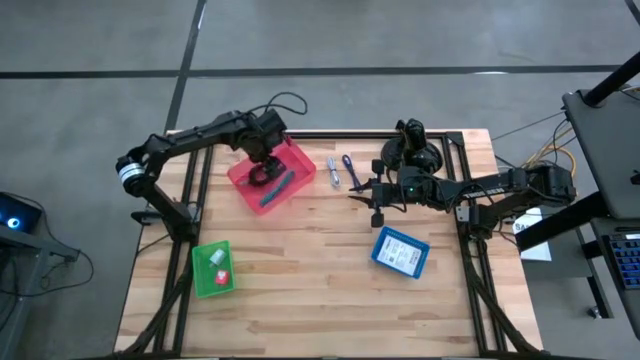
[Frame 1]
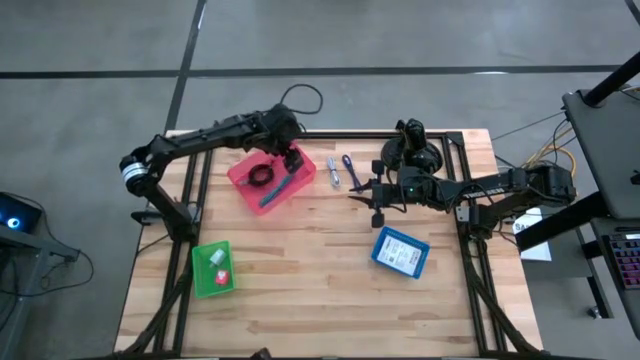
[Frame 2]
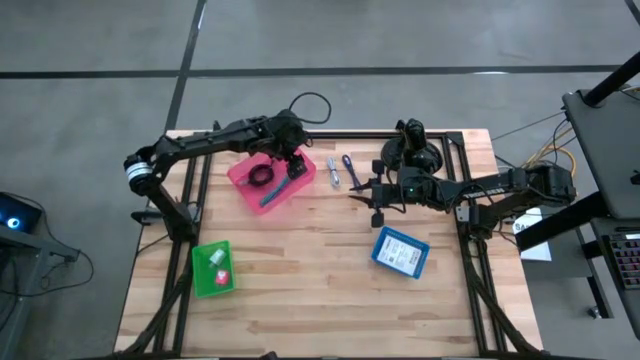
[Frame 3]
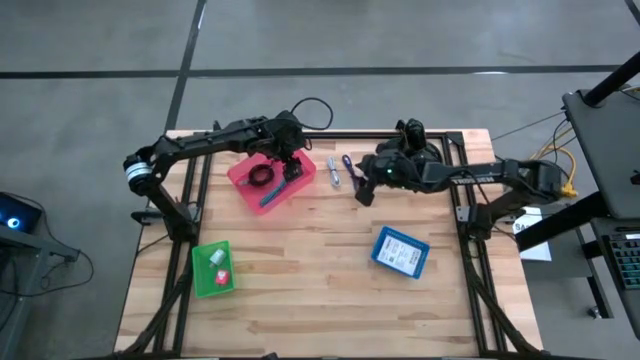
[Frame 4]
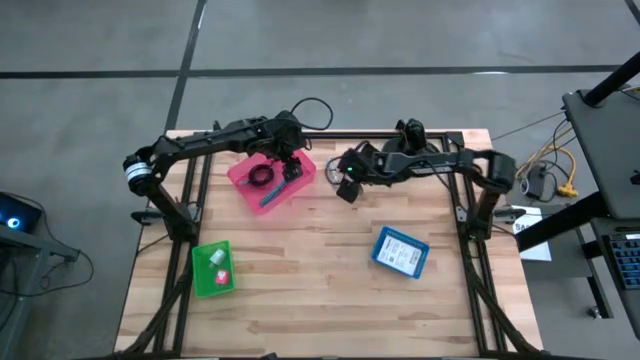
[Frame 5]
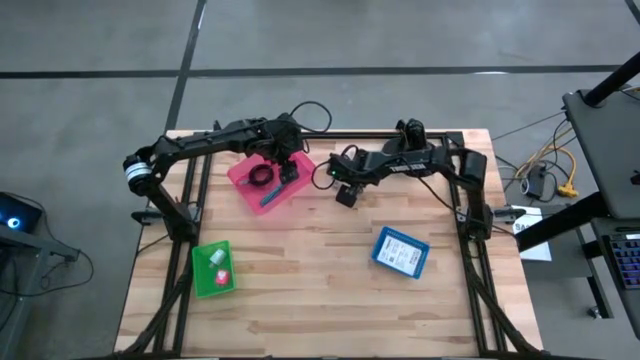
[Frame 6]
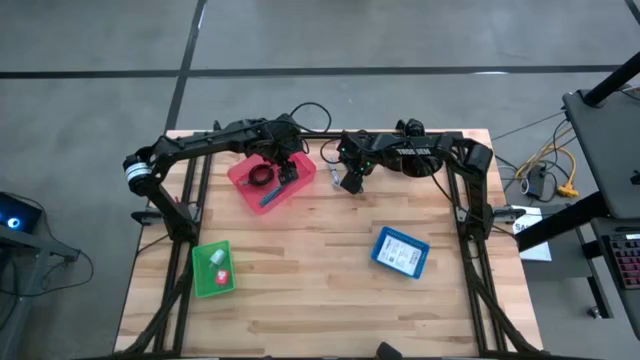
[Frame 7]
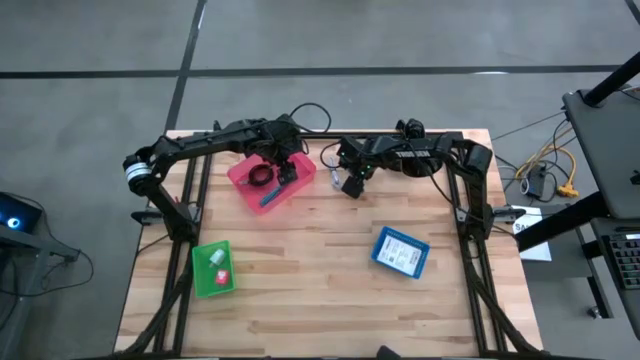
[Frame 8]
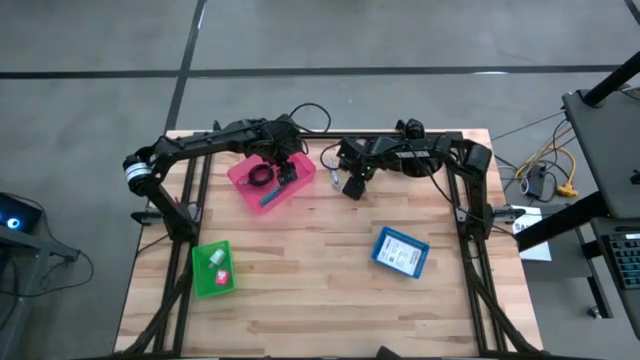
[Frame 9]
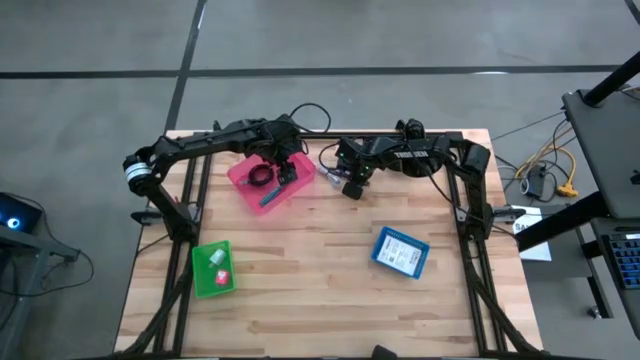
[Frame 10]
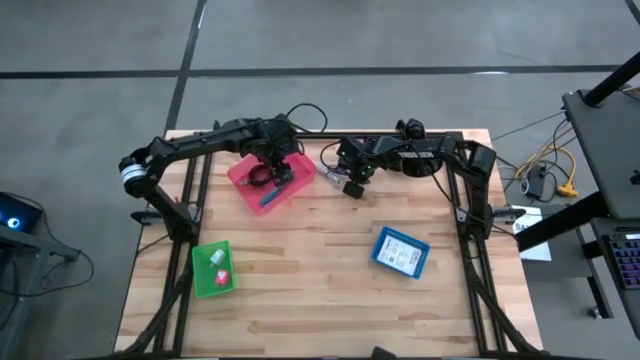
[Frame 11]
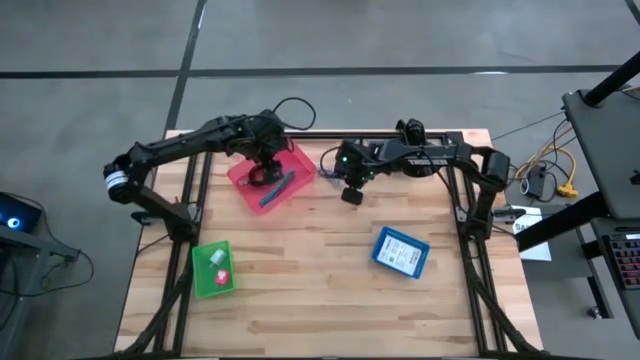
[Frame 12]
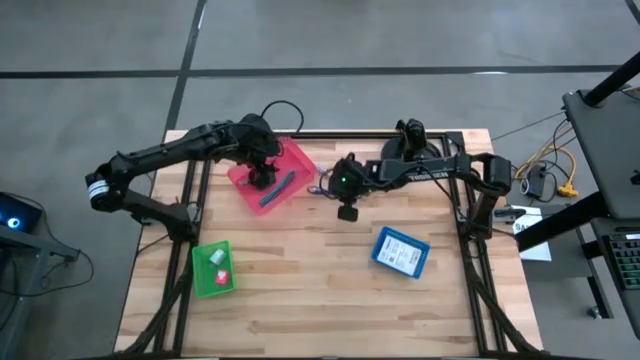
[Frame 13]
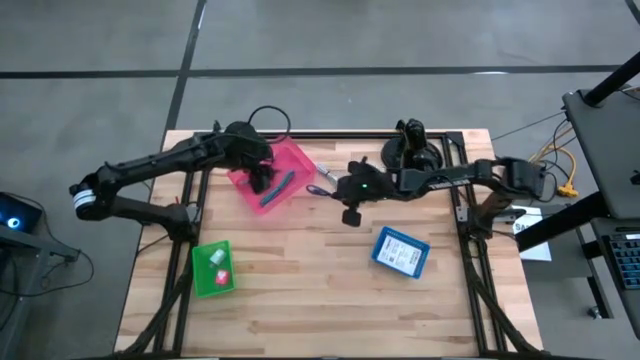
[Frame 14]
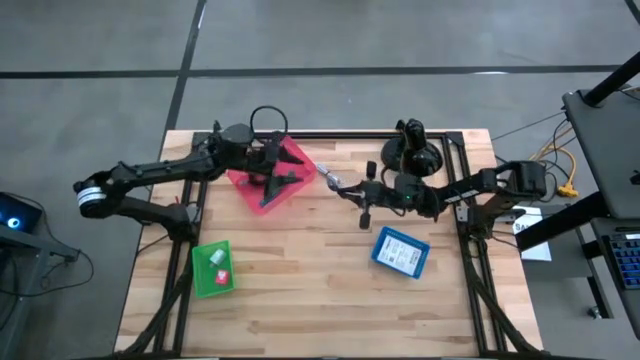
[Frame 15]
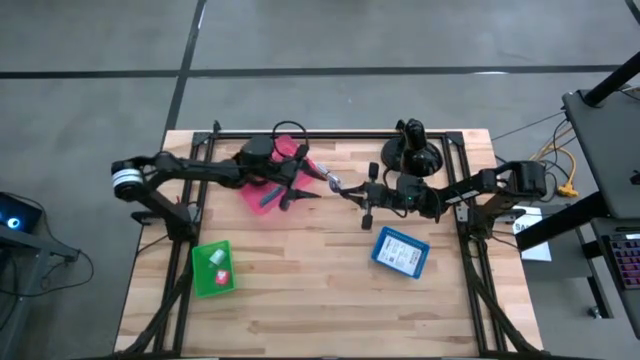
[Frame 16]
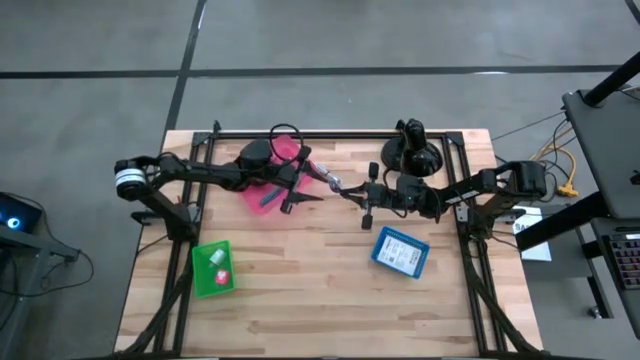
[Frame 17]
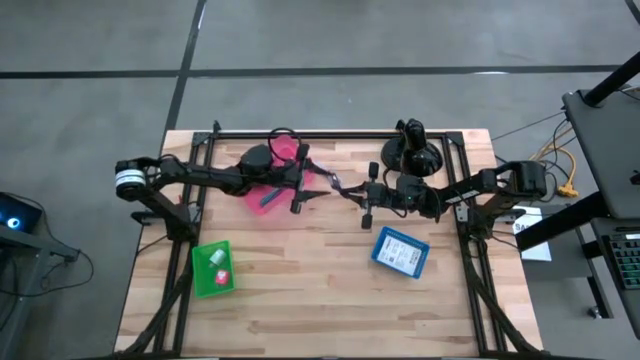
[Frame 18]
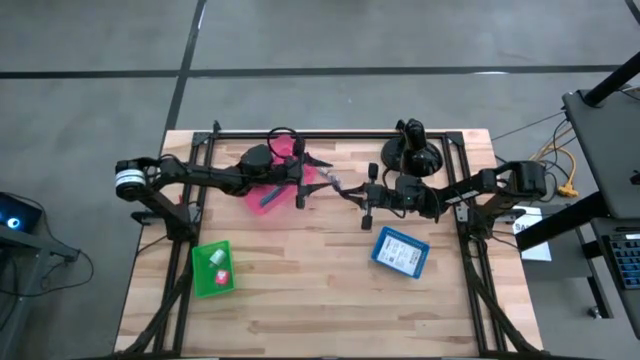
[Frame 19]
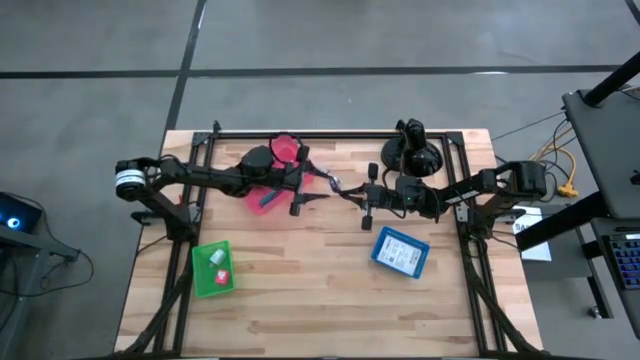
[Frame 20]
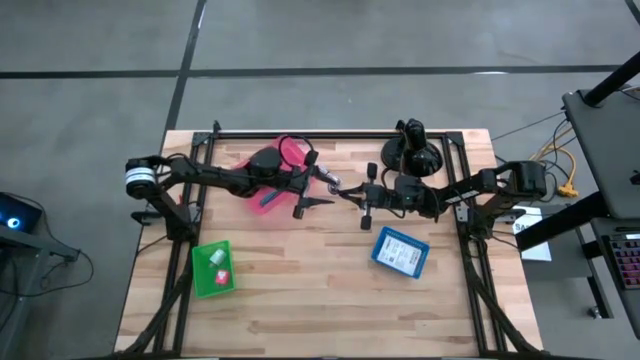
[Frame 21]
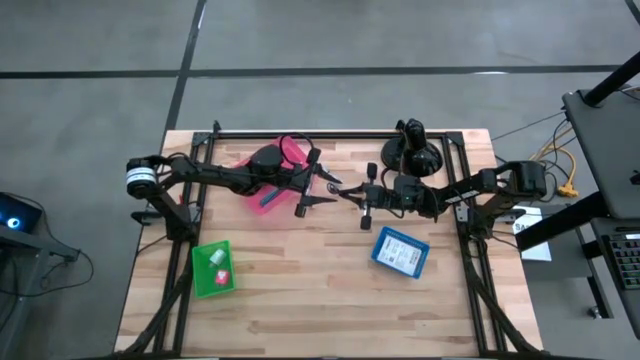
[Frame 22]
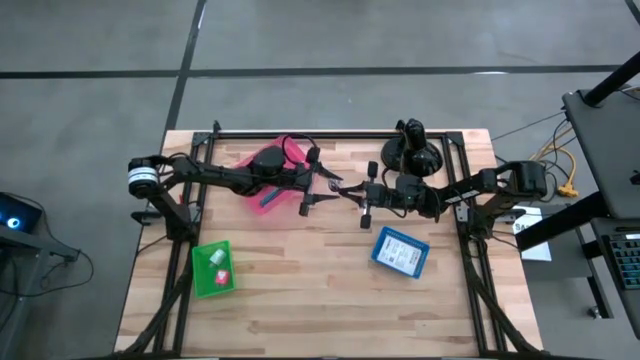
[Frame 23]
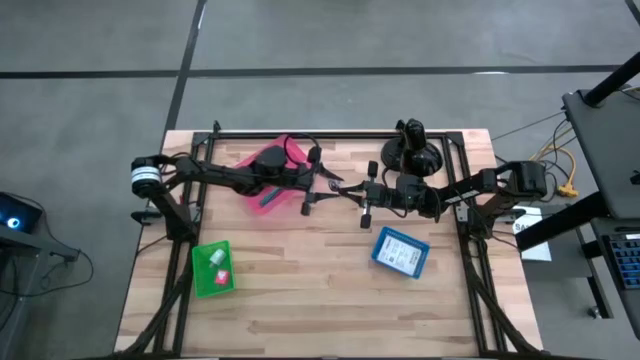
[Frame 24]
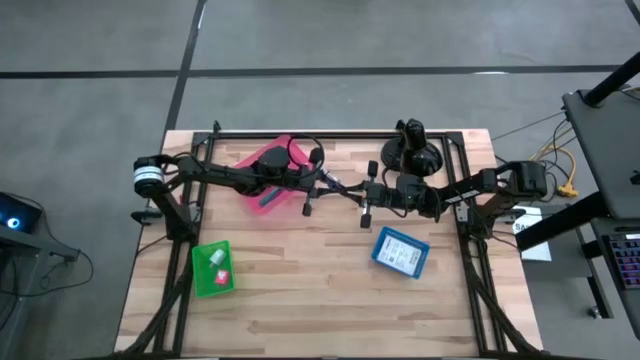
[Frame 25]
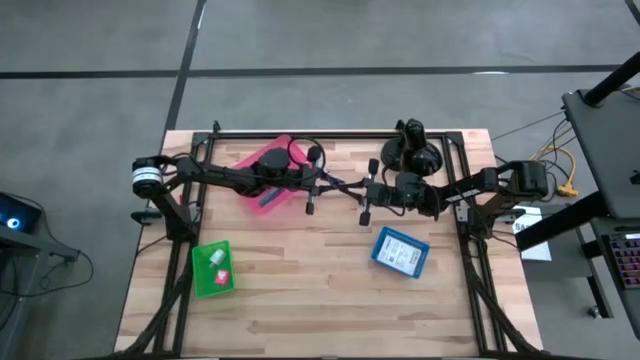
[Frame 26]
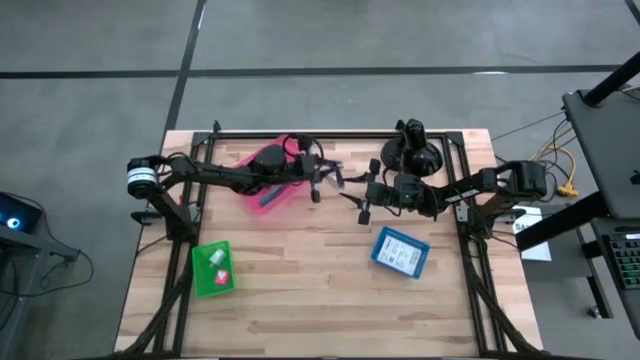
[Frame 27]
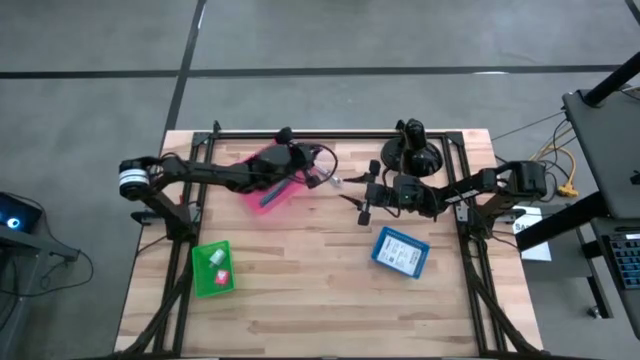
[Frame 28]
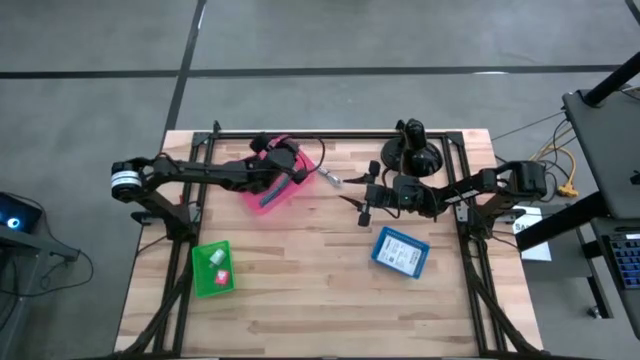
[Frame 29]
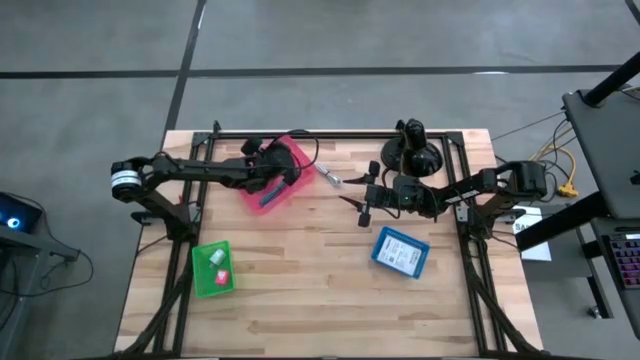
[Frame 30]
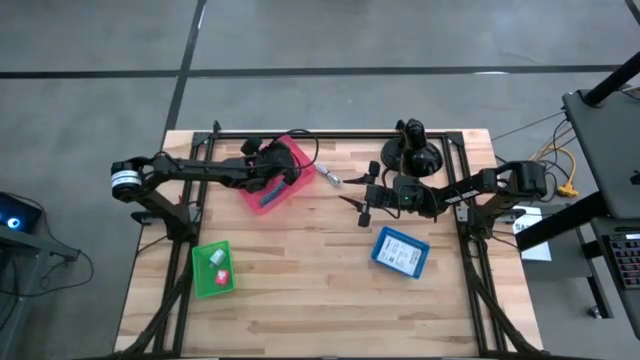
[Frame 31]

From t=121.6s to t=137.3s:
Task: Pick and place items into bin
Put the violet charger cable into the red bin
